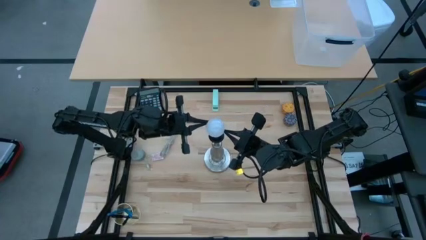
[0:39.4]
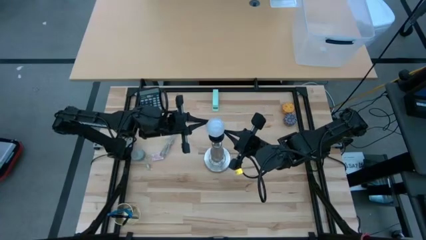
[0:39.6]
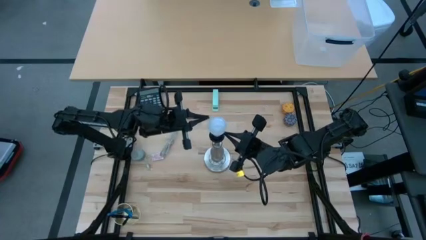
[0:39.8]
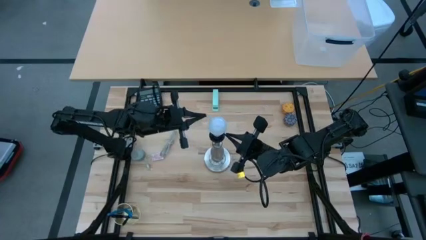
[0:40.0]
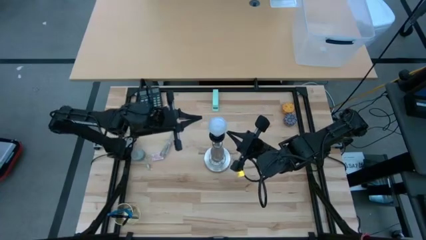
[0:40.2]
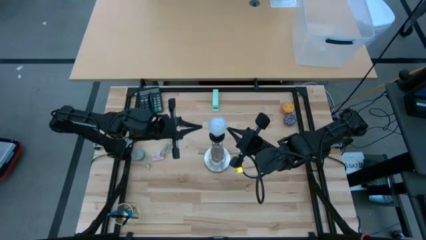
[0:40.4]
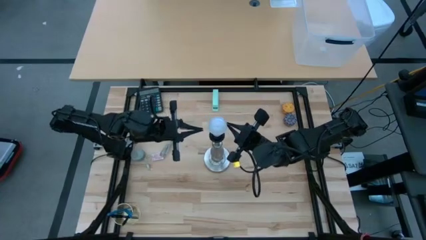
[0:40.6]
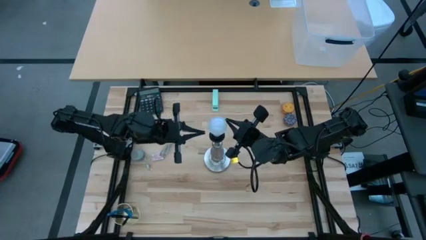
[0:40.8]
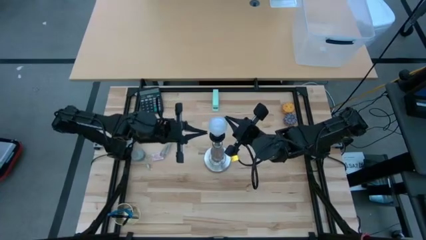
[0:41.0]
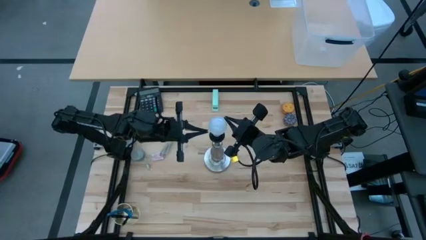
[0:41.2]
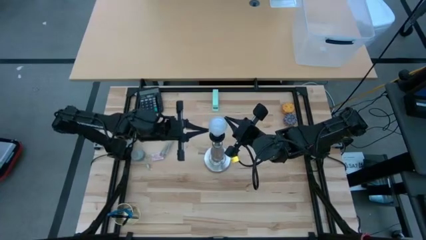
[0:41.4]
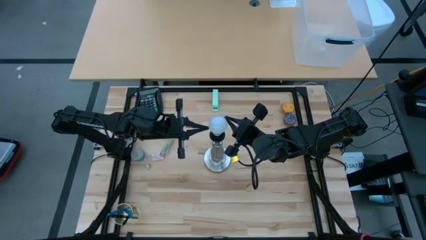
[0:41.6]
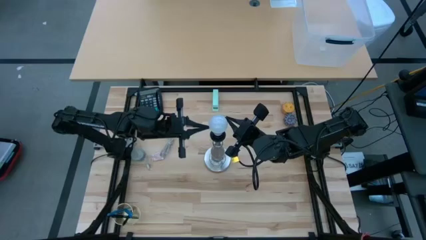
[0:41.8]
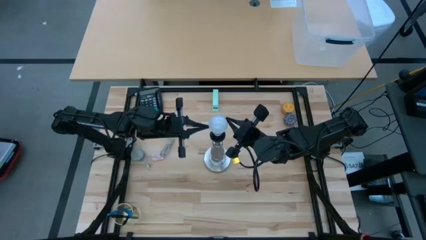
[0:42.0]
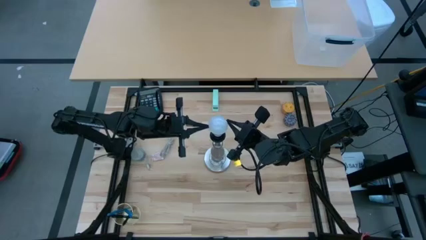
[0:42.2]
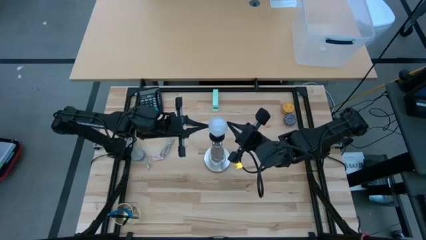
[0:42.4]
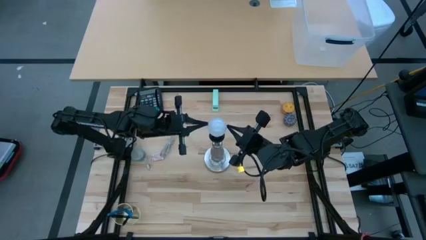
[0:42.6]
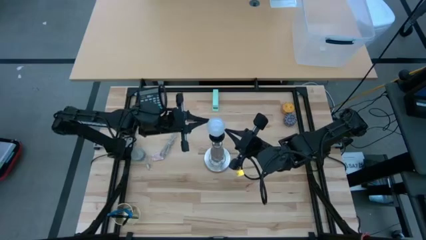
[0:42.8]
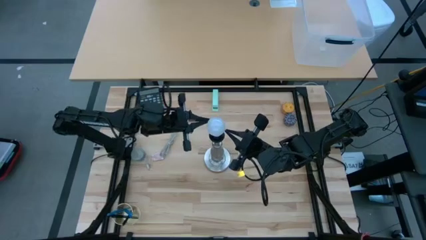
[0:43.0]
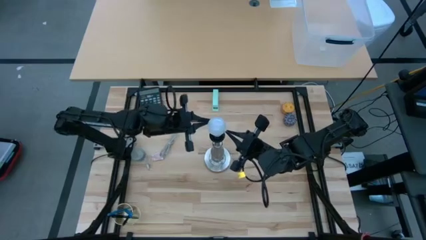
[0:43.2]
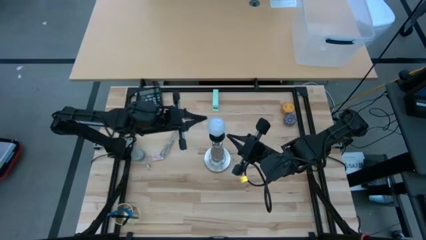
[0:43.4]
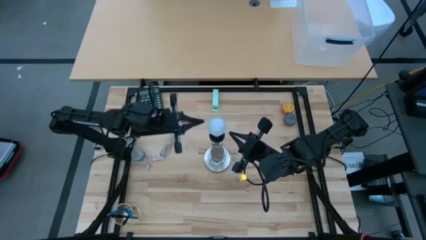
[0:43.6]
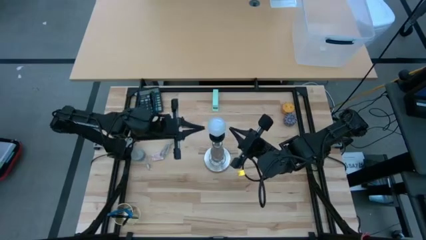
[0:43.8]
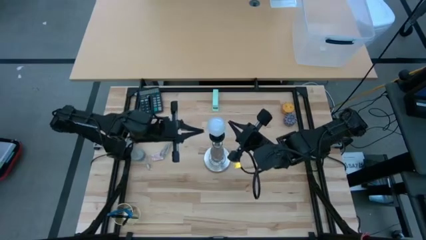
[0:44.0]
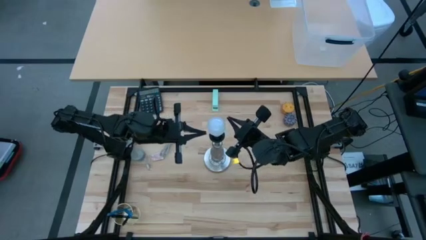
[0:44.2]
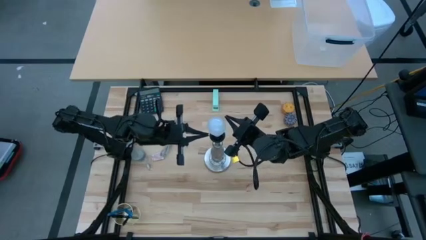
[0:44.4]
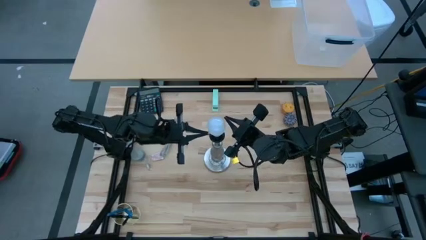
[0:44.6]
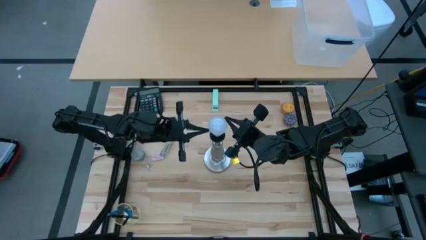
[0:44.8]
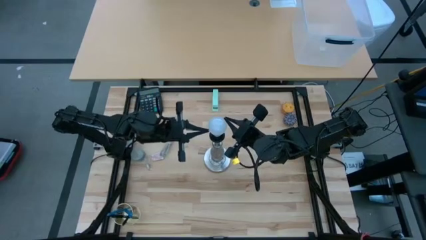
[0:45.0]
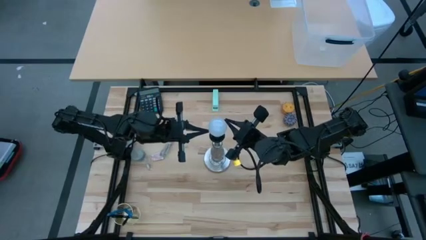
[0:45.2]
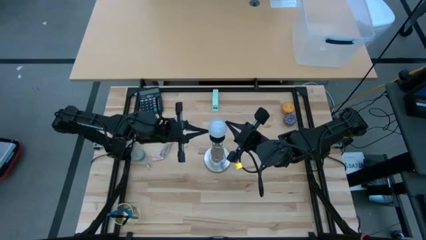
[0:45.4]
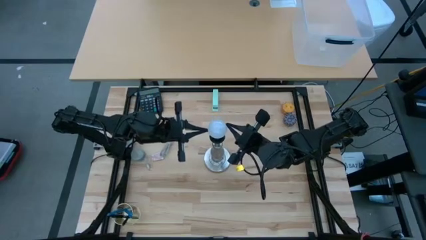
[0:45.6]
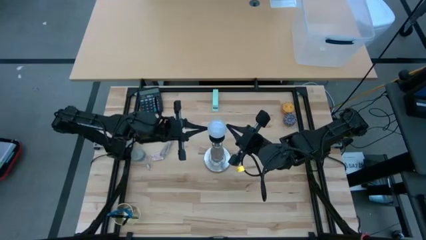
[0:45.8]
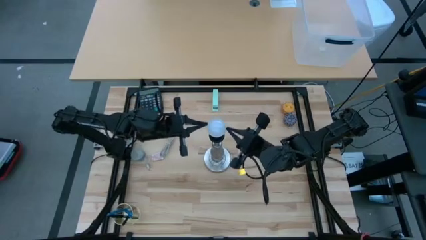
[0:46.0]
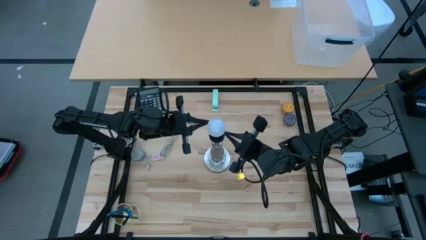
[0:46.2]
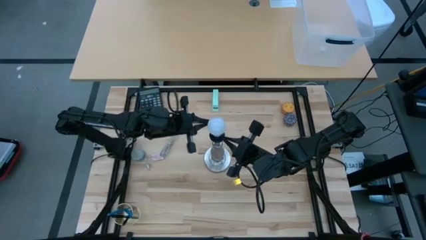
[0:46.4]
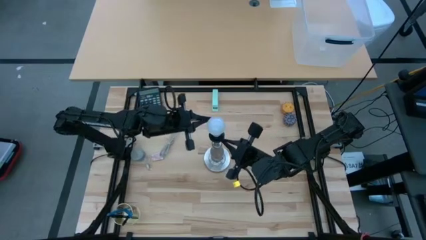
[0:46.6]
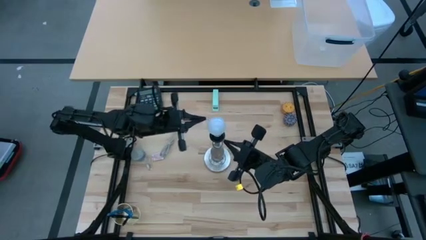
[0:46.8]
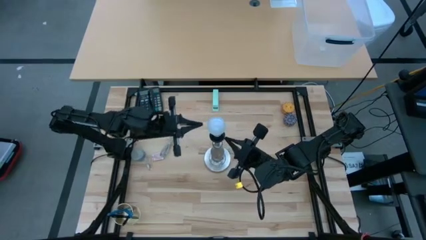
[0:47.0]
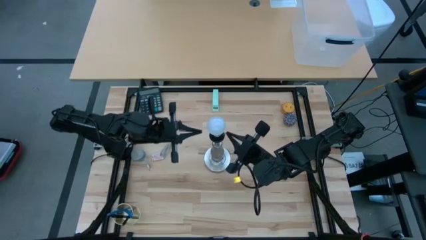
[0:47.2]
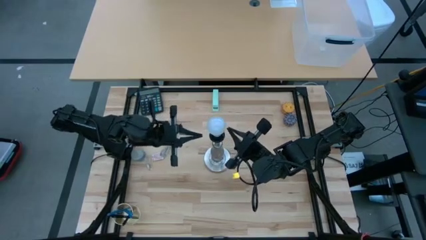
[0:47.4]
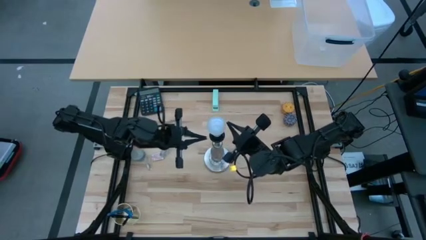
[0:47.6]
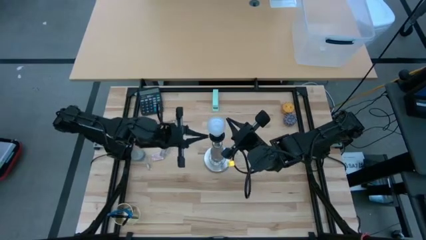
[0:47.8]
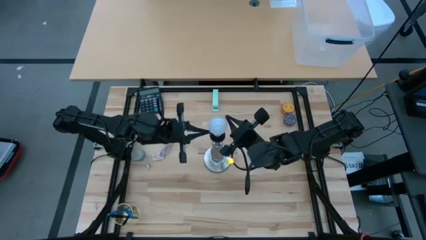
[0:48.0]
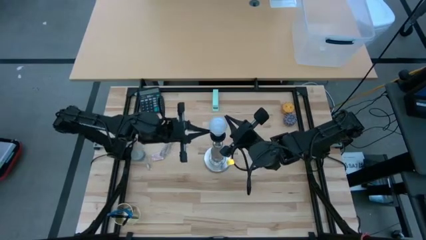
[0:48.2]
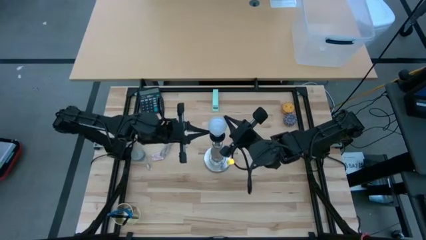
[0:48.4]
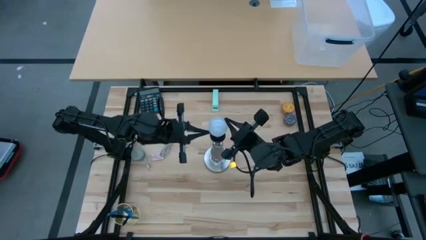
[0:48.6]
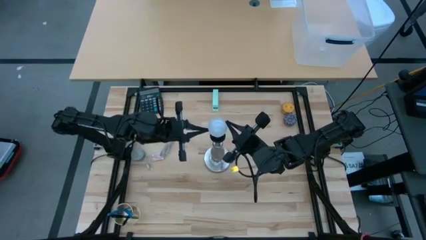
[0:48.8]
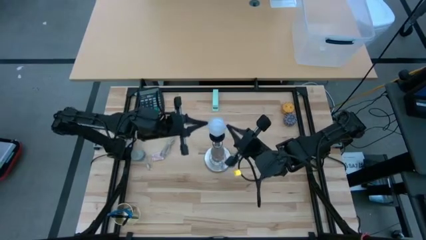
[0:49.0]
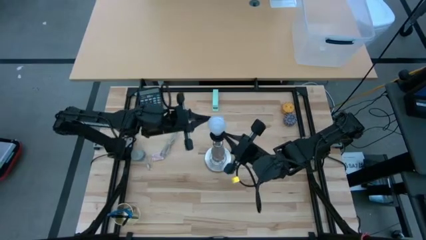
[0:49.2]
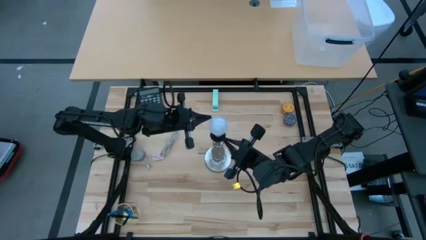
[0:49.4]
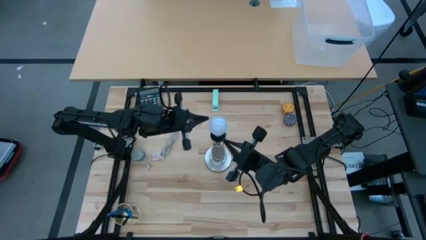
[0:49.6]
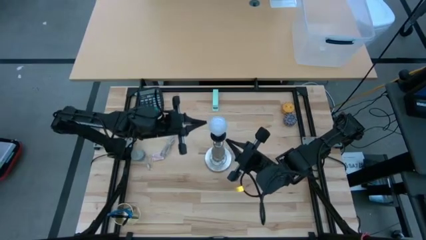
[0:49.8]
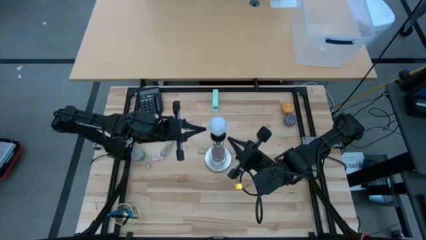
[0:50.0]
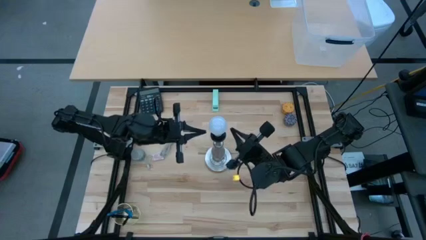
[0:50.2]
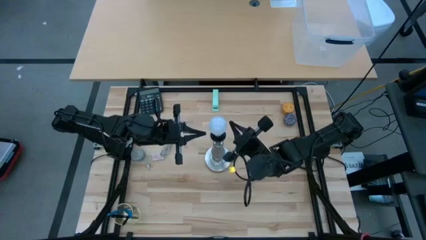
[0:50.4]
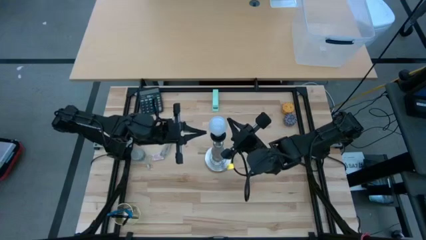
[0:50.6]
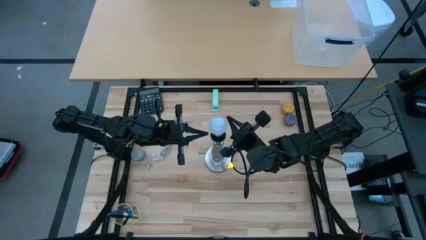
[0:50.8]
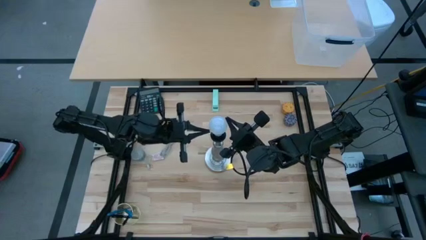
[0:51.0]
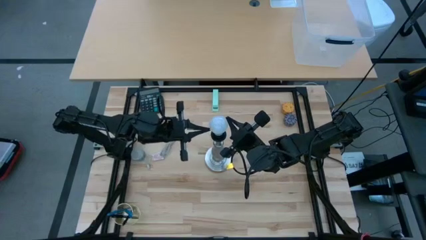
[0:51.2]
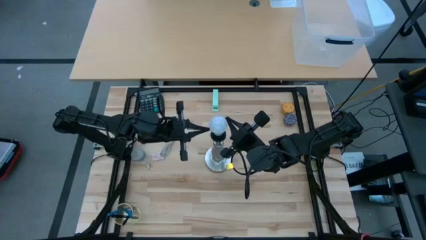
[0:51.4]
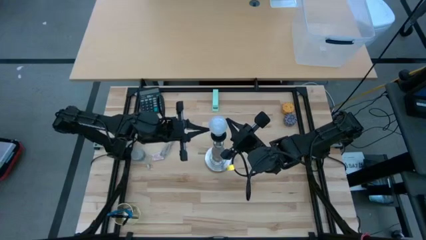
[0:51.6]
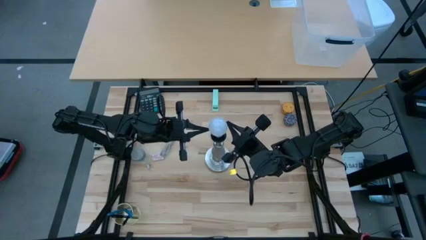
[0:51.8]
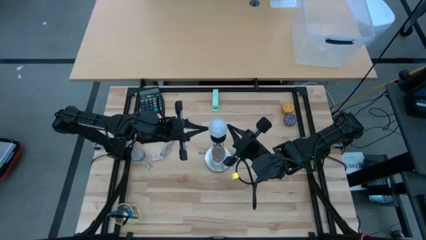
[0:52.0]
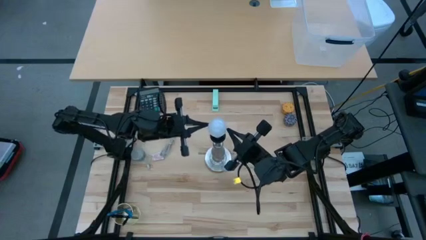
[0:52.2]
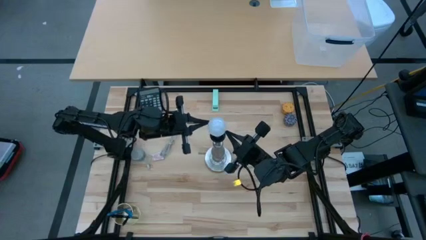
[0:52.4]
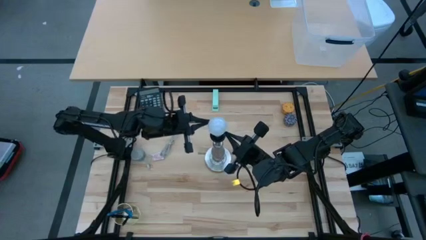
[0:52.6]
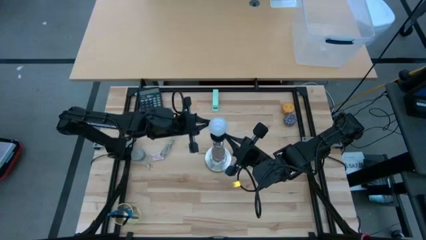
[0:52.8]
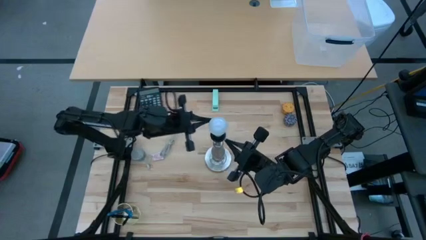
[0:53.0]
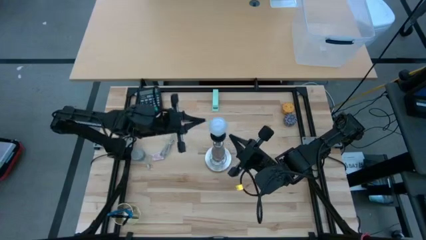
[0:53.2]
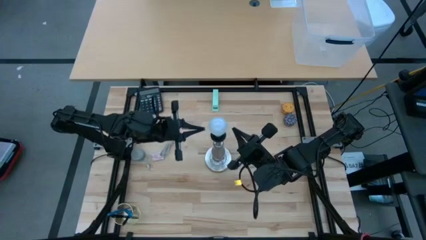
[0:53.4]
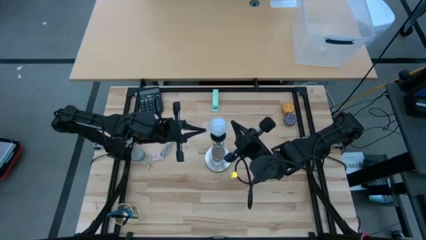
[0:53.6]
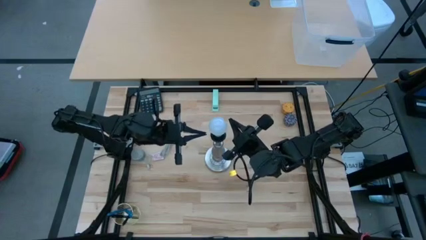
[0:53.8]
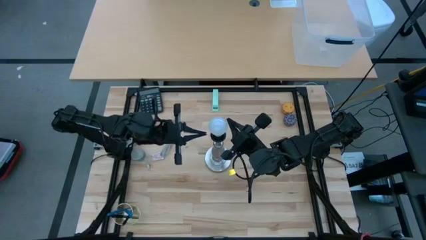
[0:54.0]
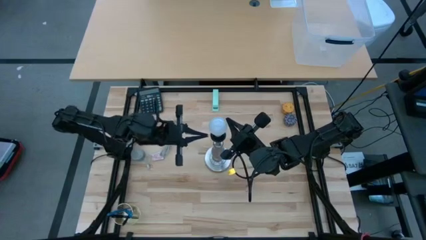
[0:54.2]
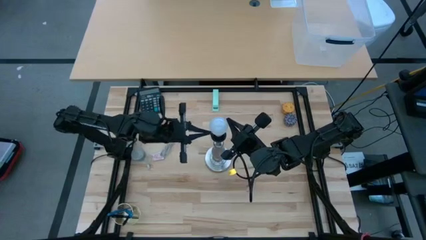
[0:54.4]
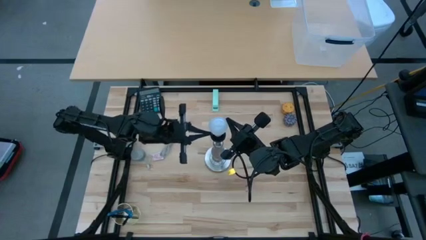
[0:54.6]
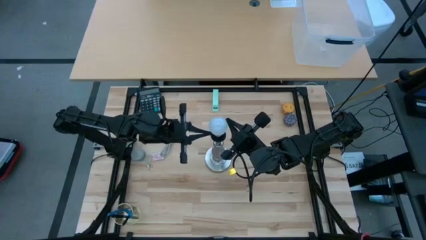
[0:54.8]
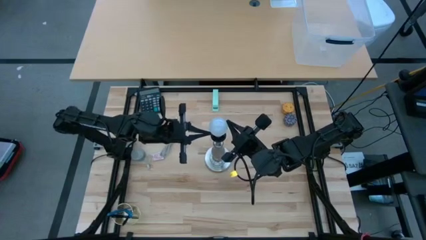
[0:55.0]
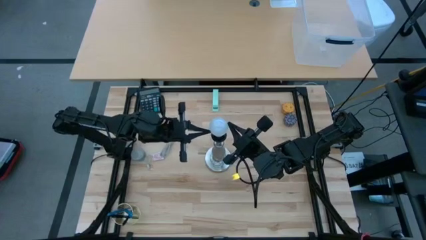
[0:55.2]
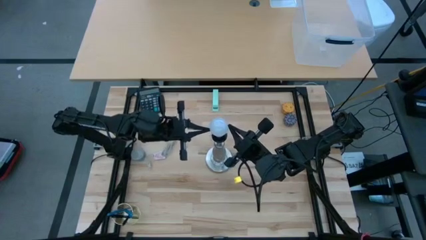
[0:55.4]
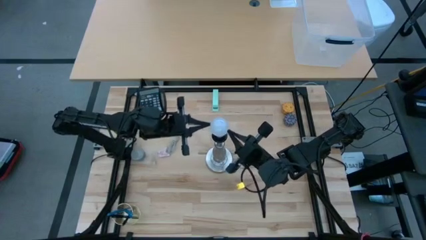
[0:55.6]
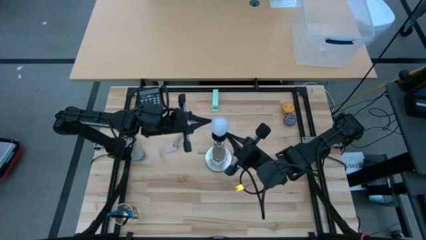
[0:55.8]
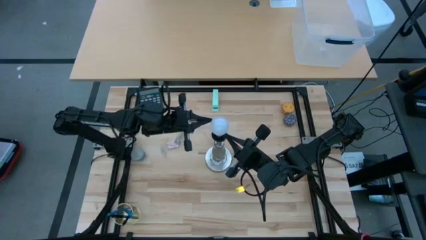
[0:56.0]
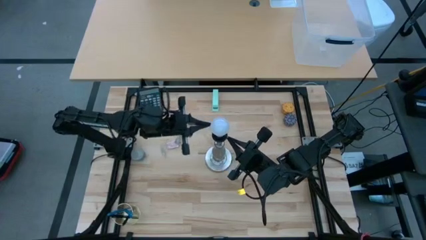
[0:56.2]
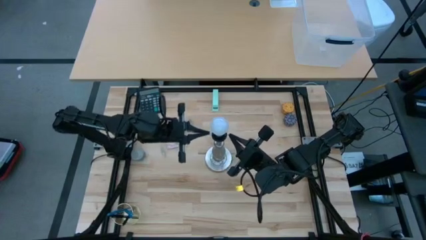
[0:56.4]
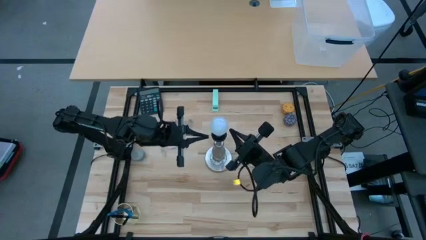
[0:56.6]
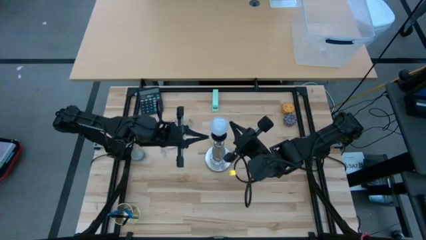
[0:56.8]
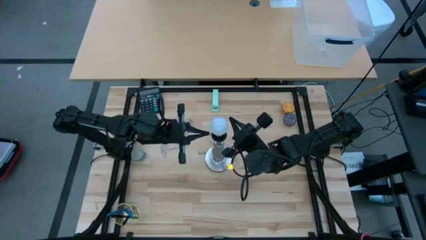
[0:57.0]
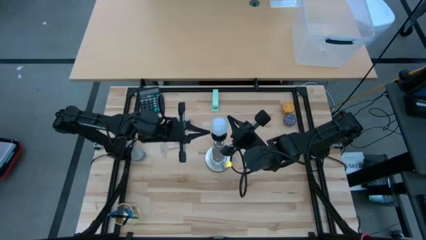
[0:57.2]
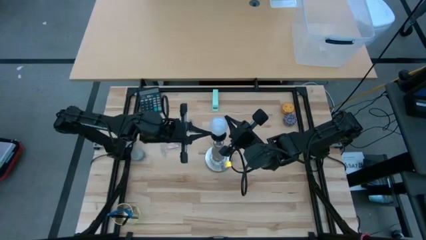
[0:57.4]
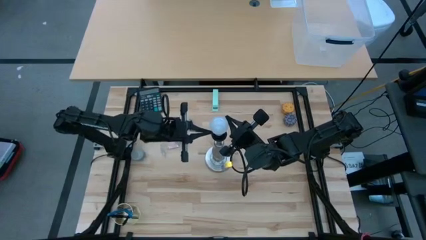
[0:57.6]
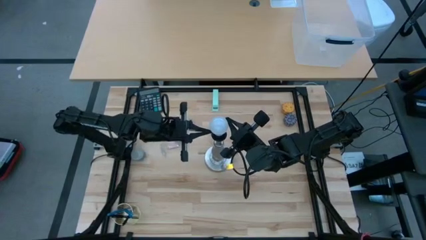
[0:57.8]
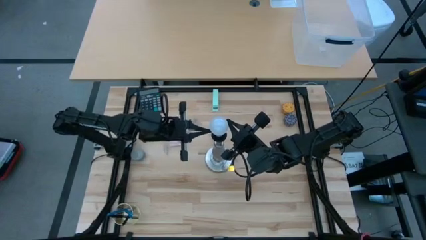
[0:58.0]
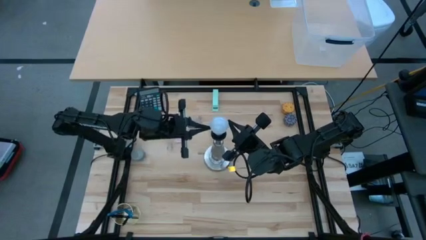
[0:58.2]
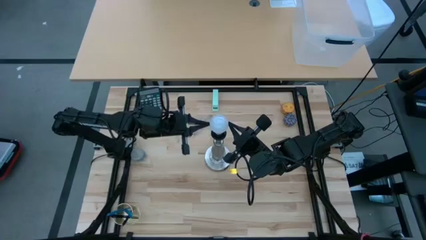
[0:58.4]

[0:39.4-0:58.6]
Task: Screw lightbulb
Insert the white lightbulb into the desk lamp
